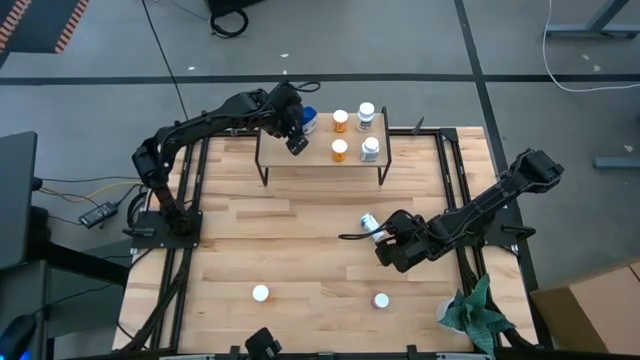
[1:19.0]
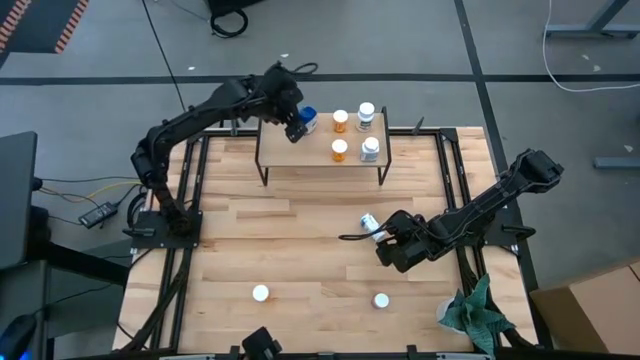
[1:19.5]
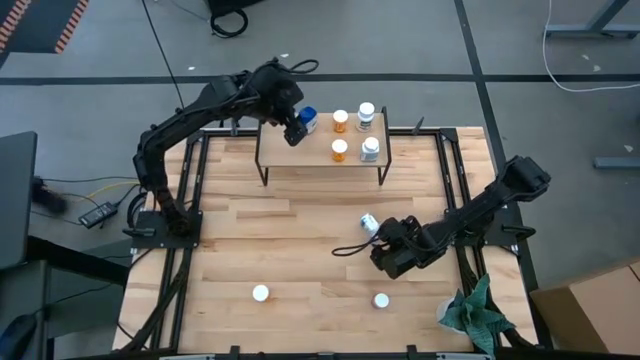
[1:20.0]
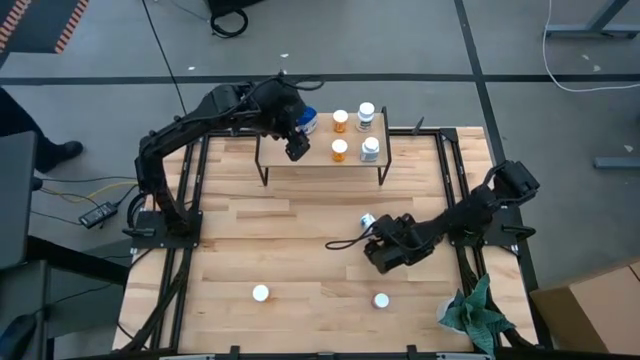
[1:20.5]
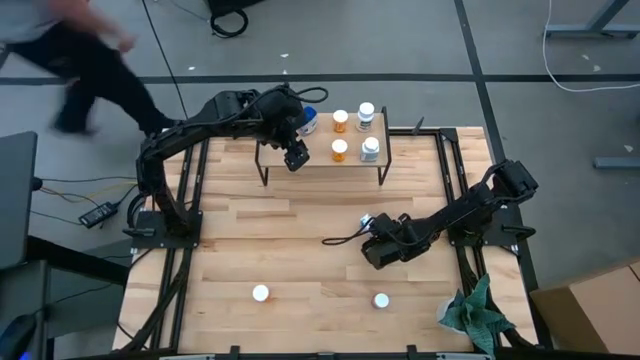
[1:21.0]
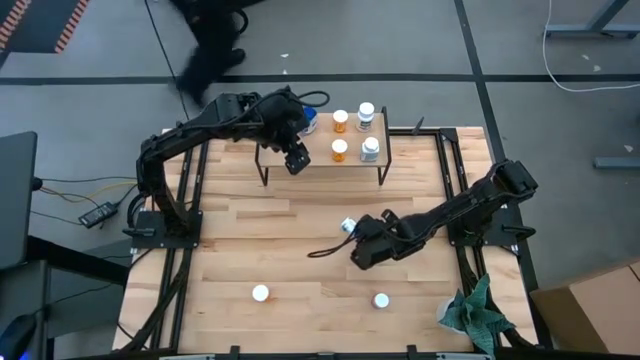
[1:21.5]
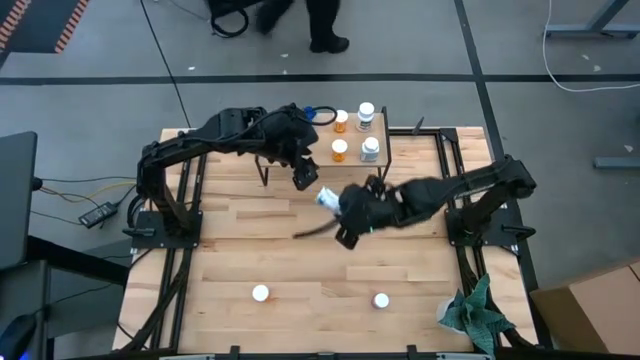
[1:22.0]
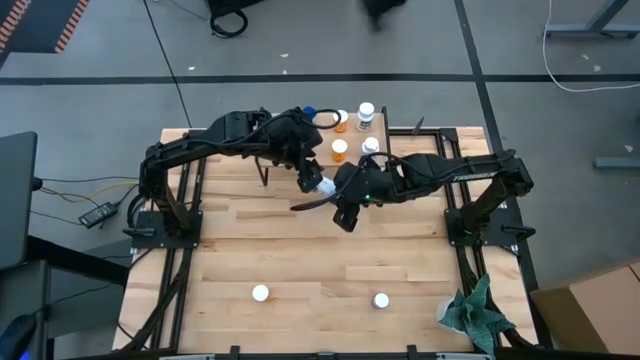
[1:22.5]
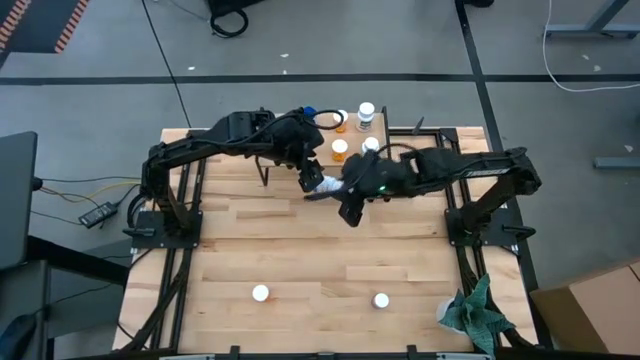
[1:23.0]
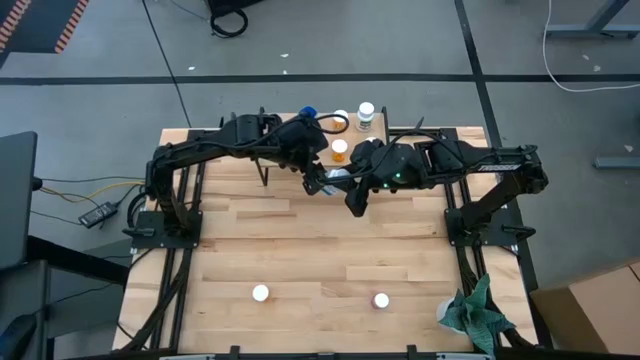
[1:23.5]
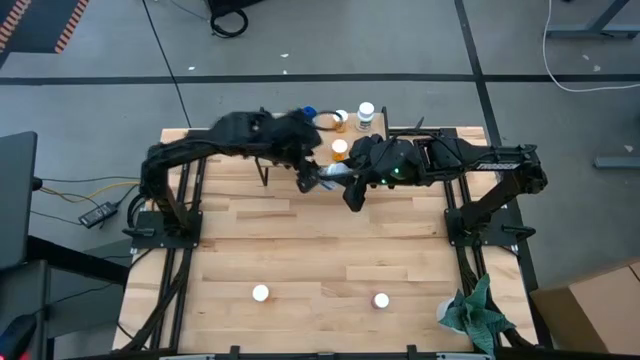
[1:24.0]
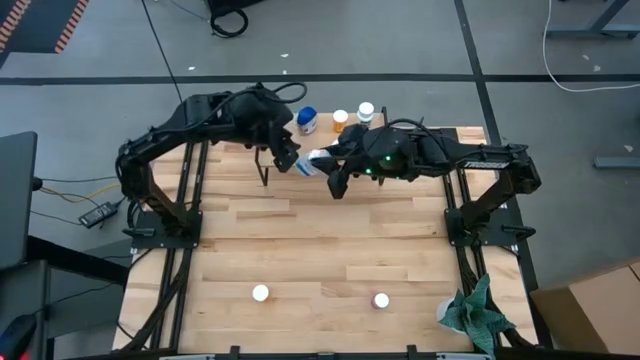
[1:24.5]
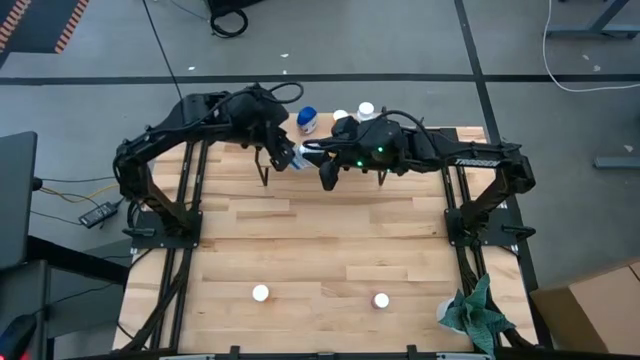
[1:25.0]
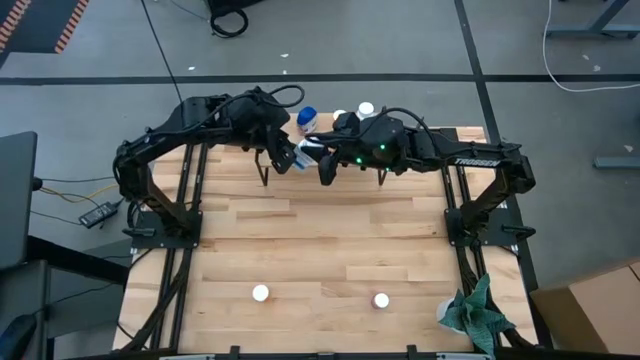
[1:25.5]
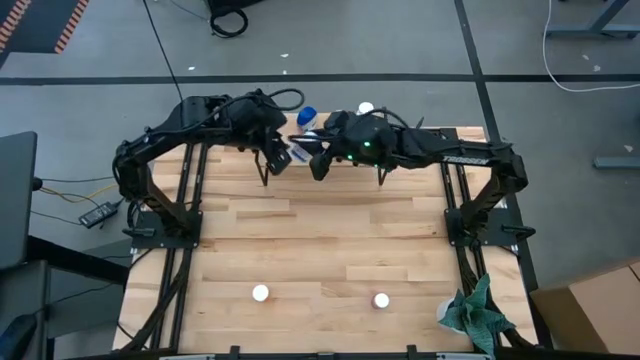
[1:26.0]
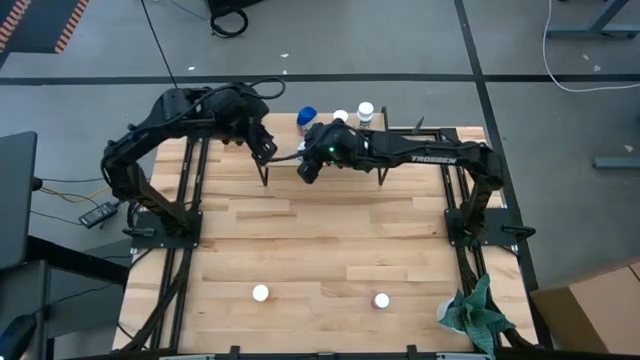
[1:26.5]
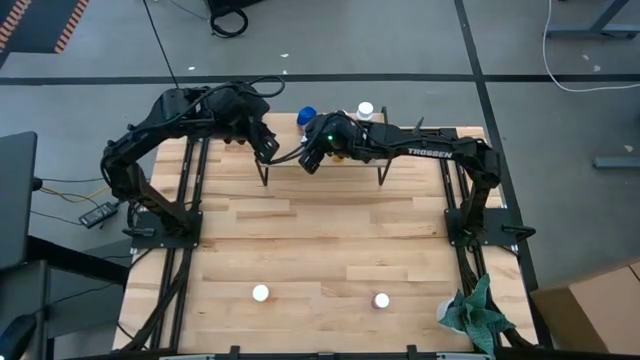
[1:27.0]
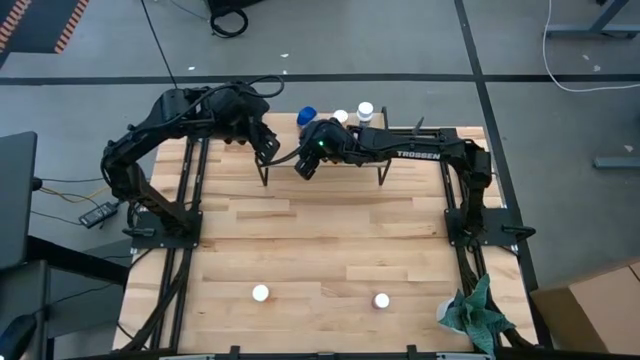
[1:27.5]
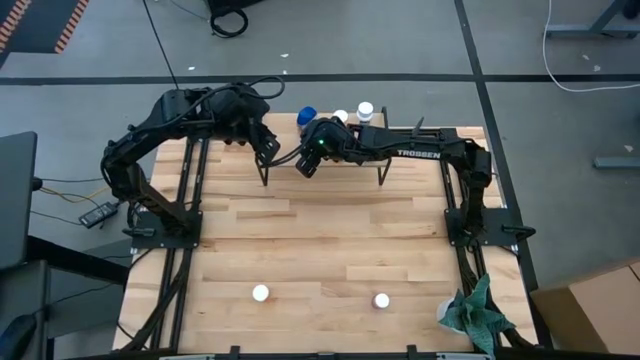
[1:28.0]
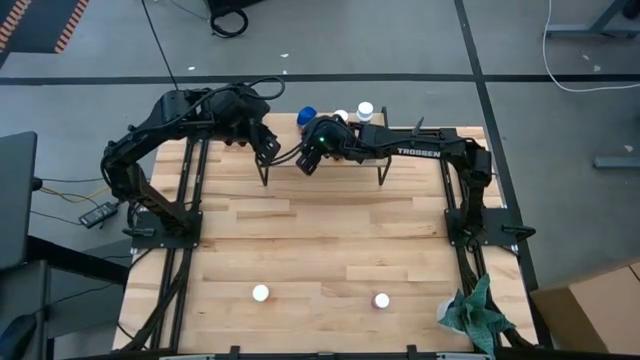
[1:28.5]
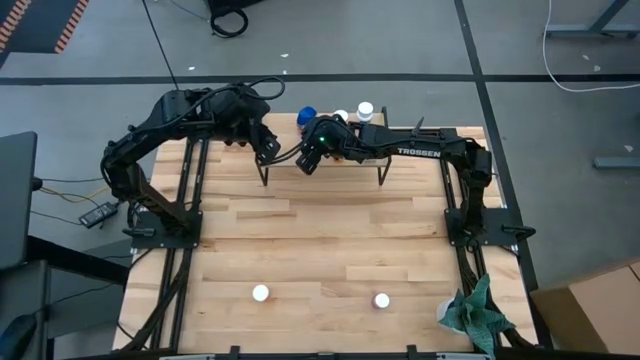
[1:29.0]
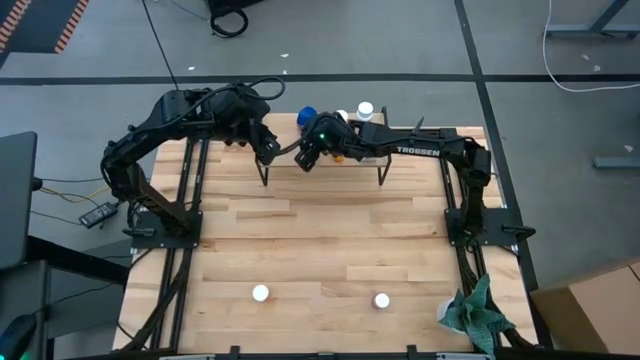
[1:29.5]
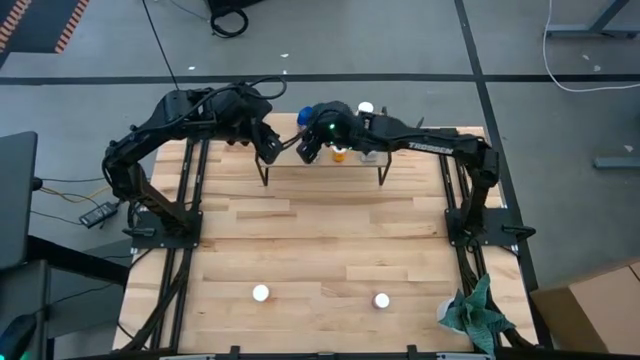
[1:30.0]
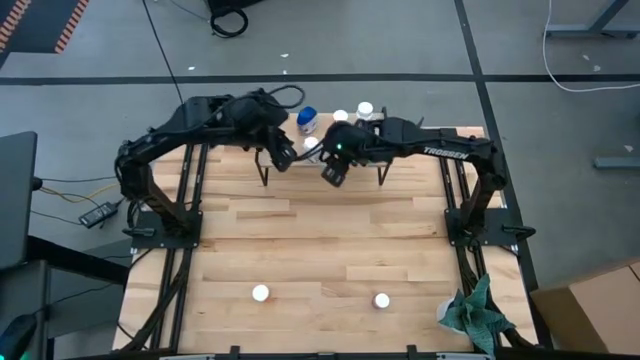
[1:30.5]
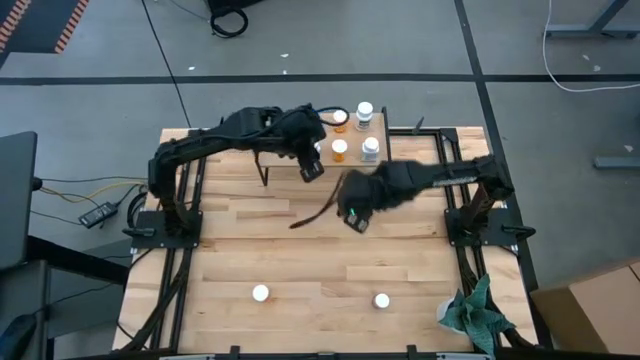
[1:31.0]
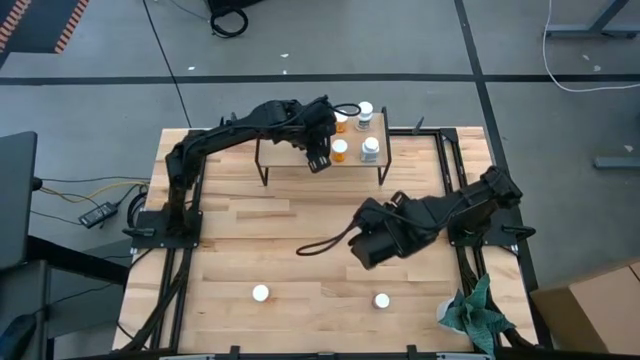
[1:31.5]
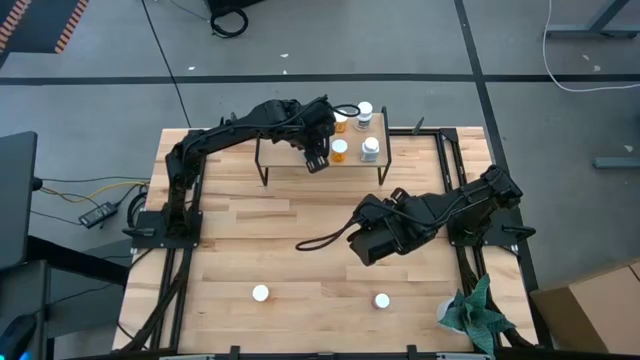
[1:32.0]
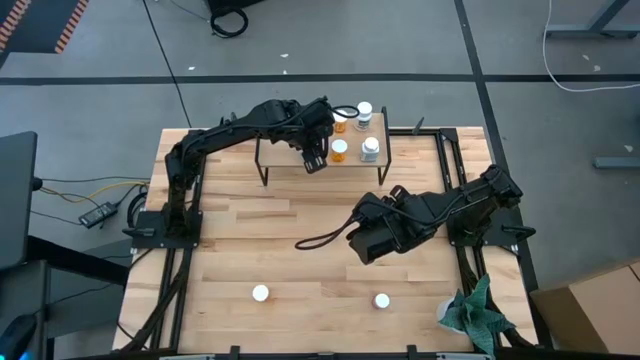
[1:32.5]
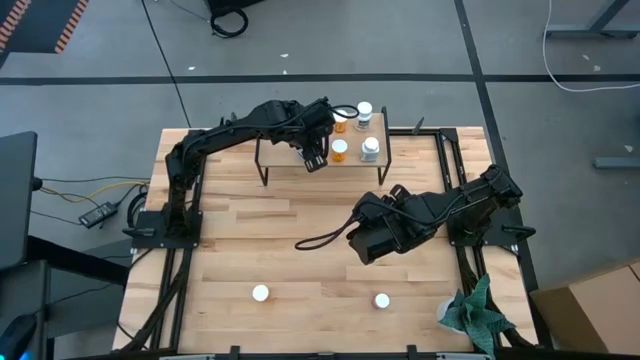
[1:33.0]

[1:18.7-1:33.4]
Task: Pick and place medicine bottles onto shelf by color
Put the white blue medicine bottle on the shelf

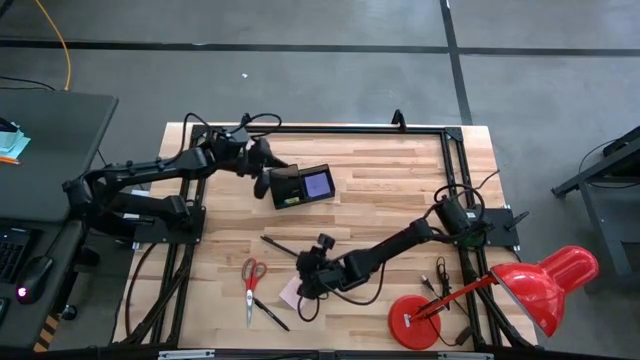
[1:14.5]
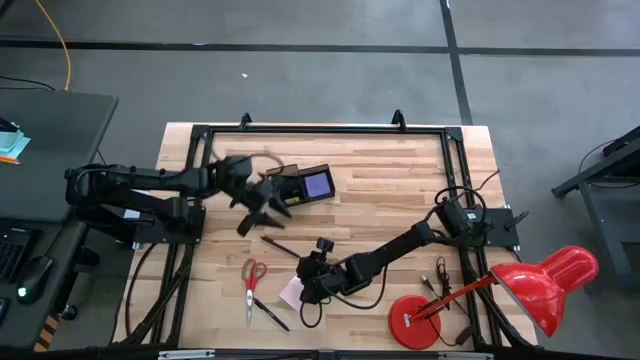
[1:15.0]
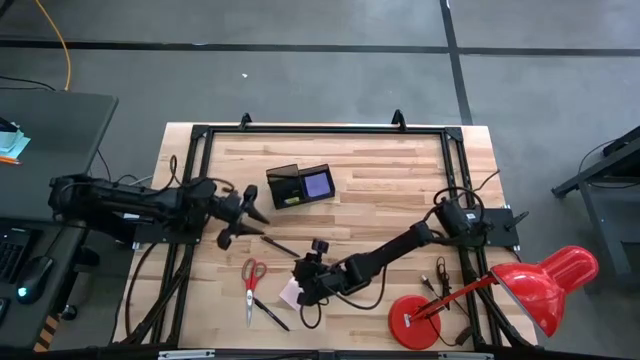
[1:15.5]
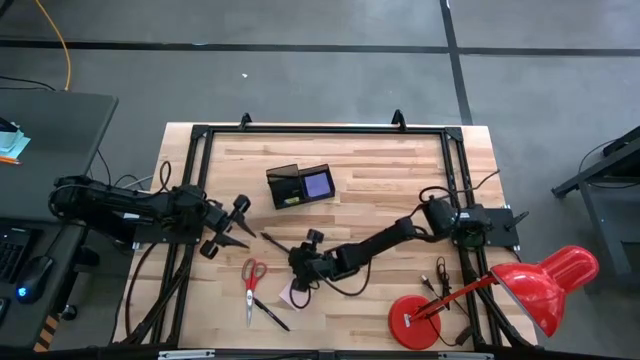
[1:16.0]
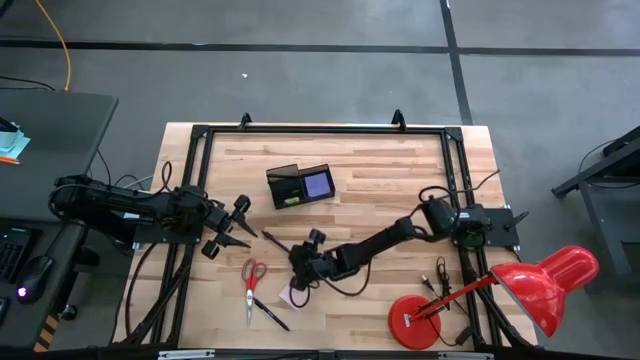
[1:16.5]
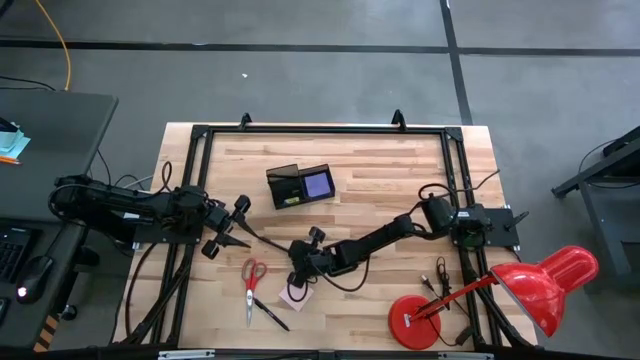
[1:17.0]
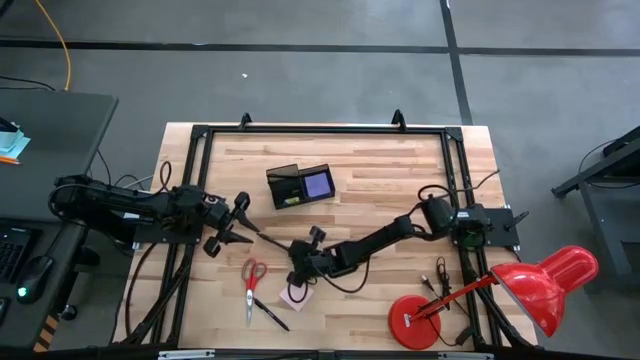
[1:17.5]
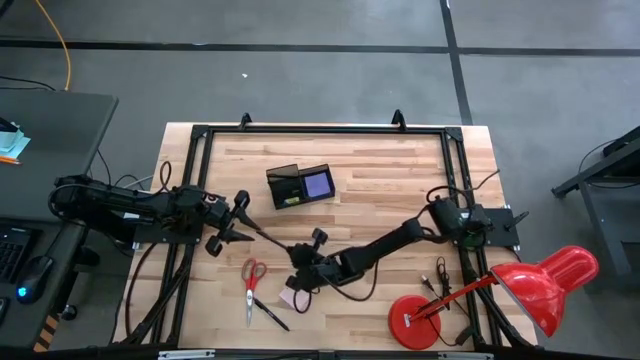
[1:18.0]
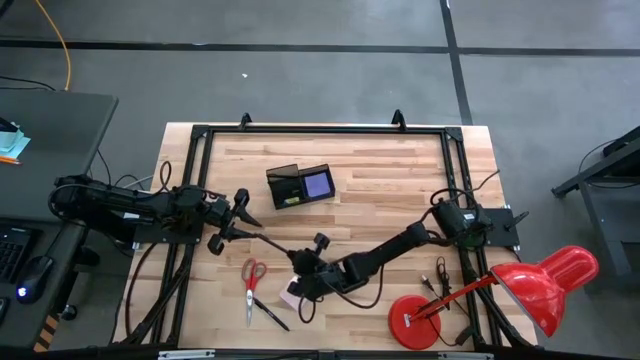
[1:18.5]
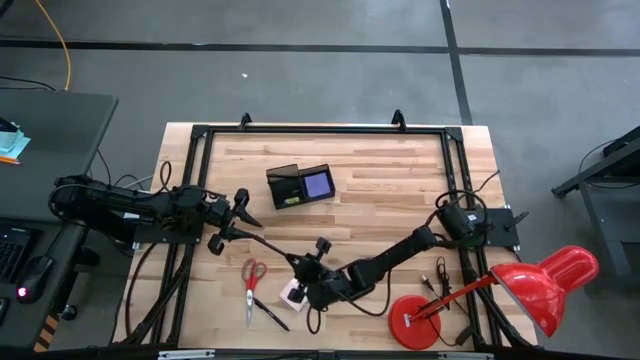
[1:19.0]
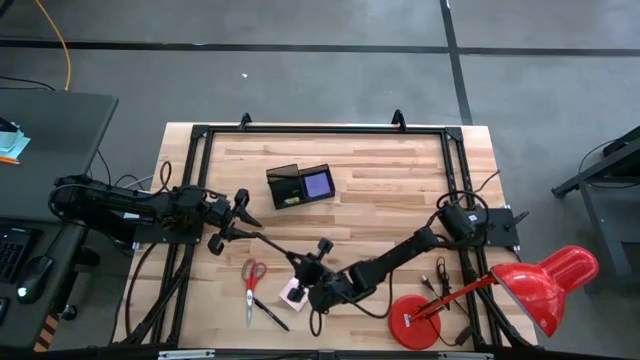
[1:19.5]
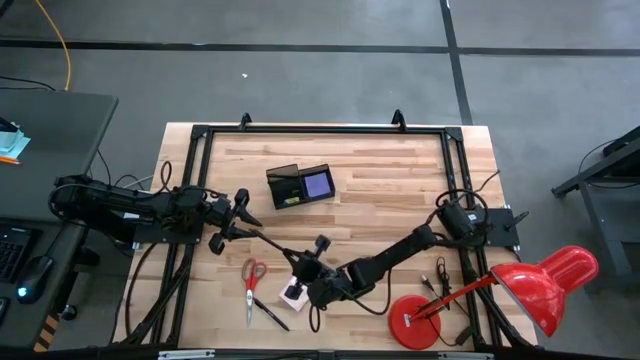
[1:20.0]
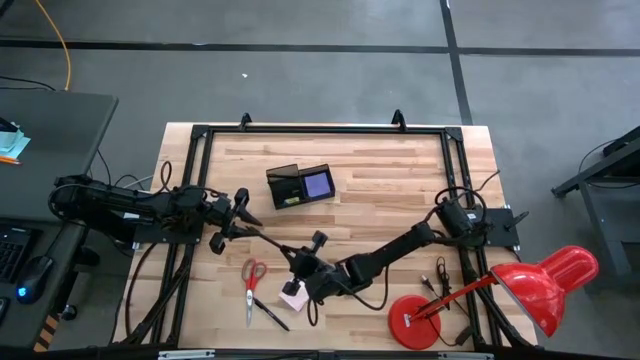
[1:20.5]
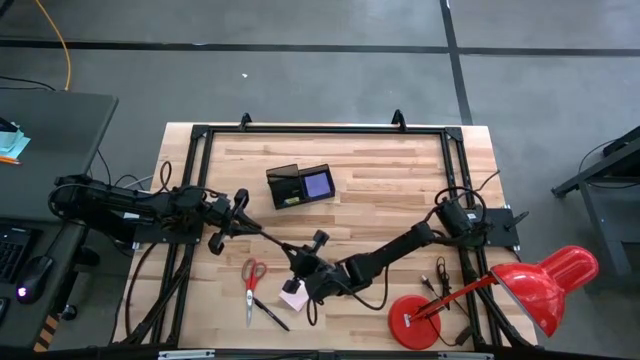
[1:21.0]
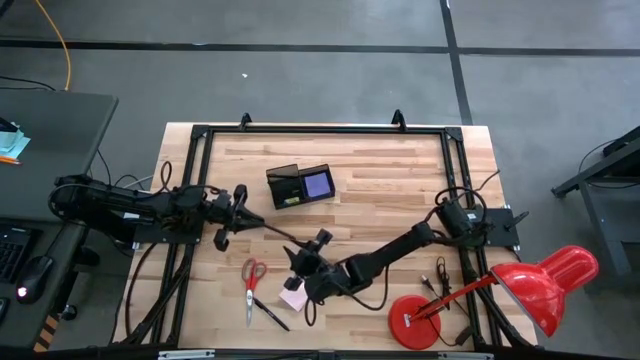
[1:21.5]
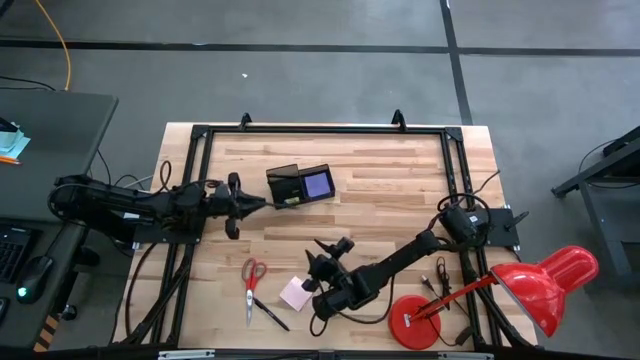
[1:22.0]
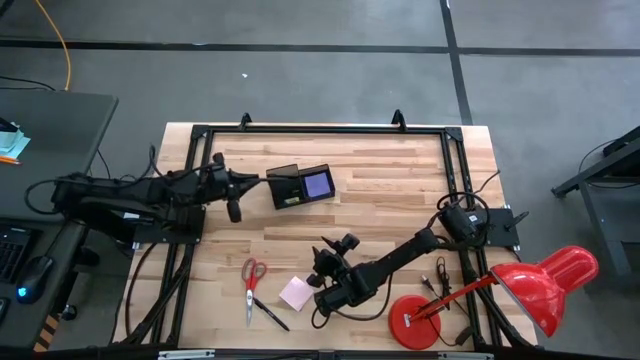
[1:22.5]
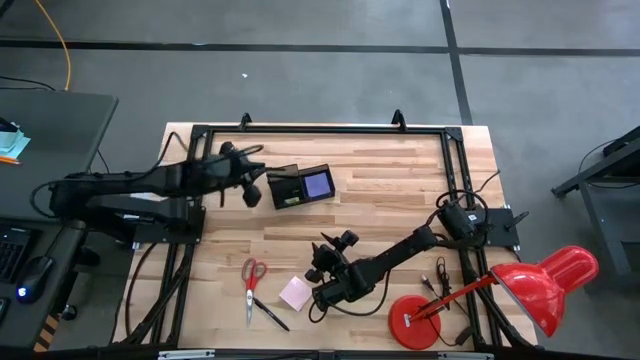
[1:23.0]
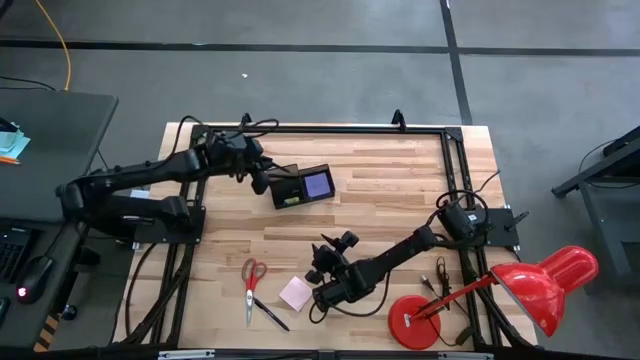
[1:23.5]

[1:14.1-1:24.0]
Task: Pick and place office supplies into organizer
Put the black pen into the black desk organizer
